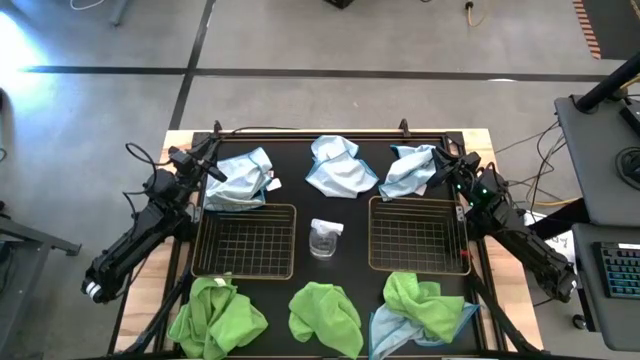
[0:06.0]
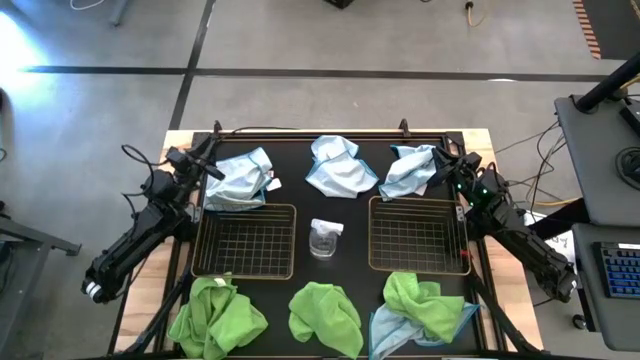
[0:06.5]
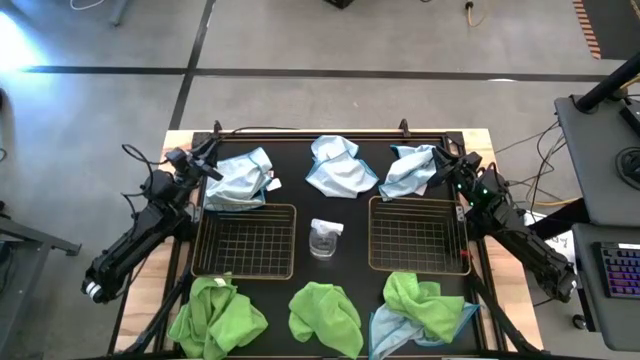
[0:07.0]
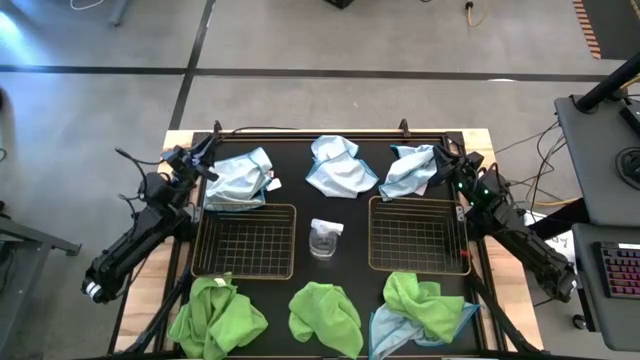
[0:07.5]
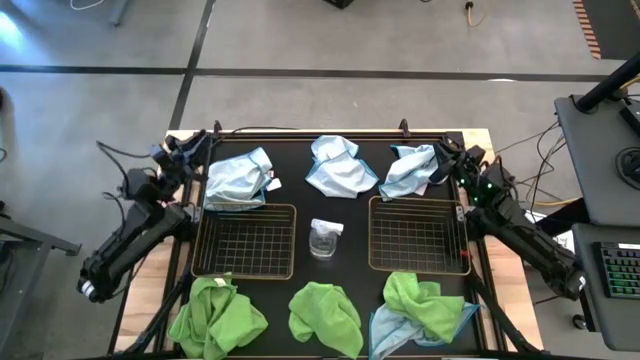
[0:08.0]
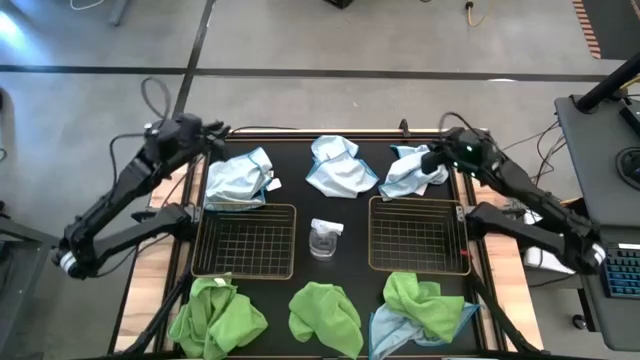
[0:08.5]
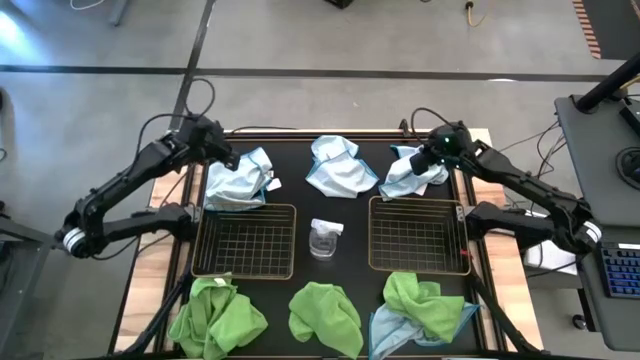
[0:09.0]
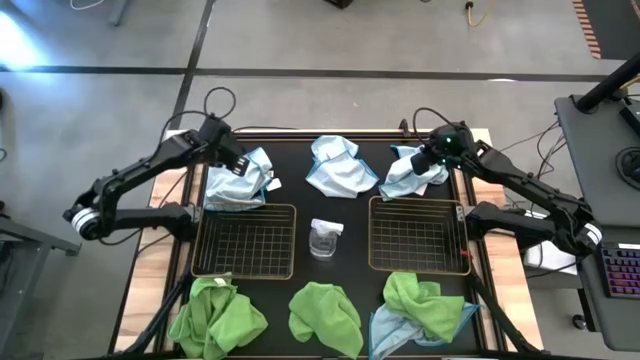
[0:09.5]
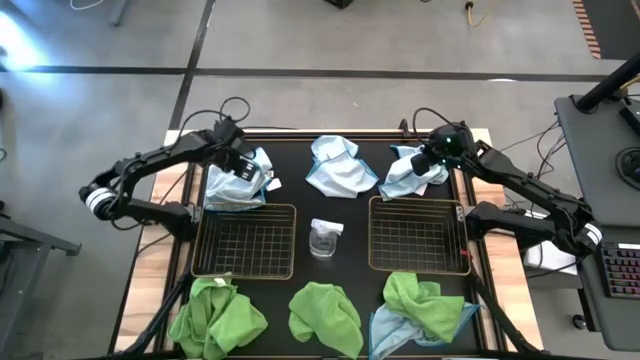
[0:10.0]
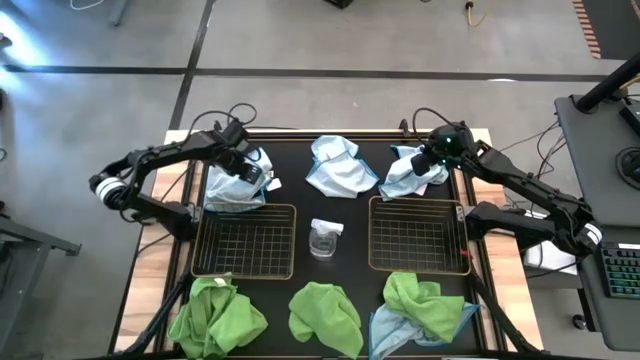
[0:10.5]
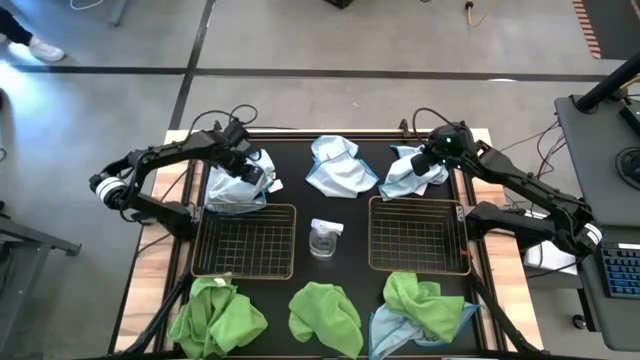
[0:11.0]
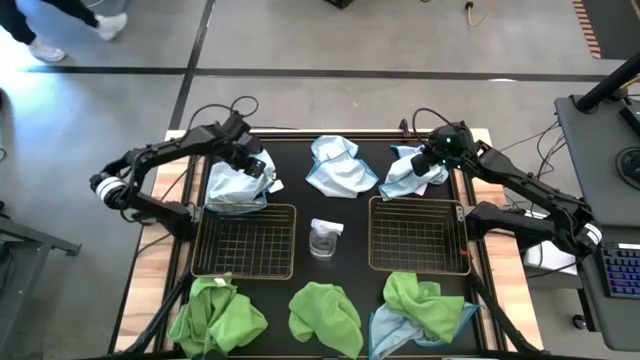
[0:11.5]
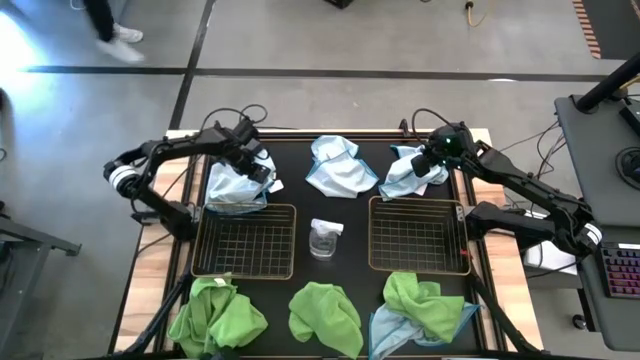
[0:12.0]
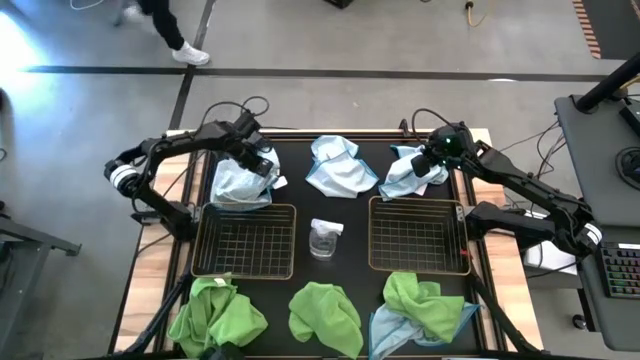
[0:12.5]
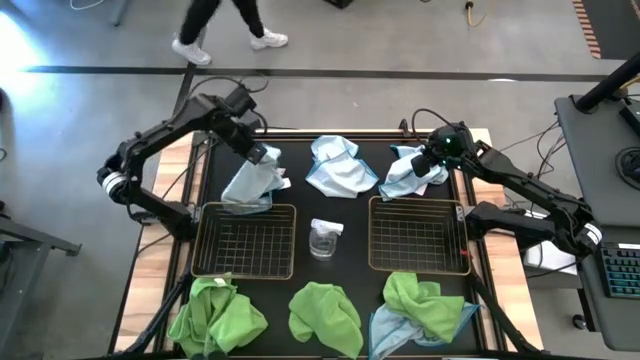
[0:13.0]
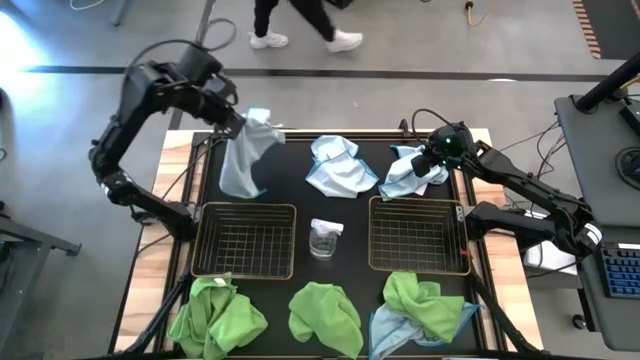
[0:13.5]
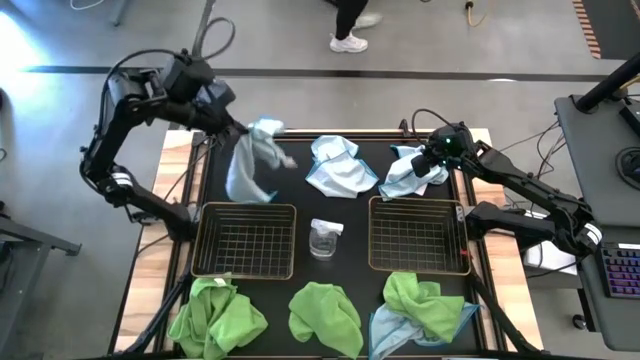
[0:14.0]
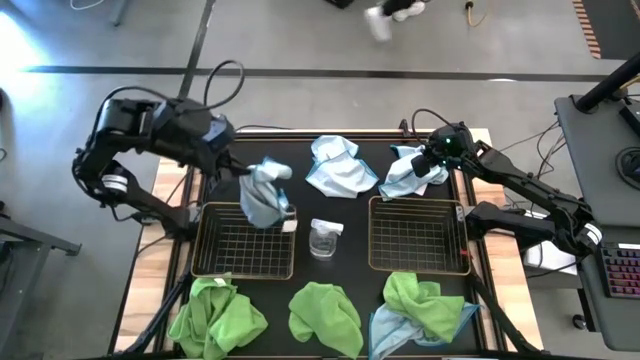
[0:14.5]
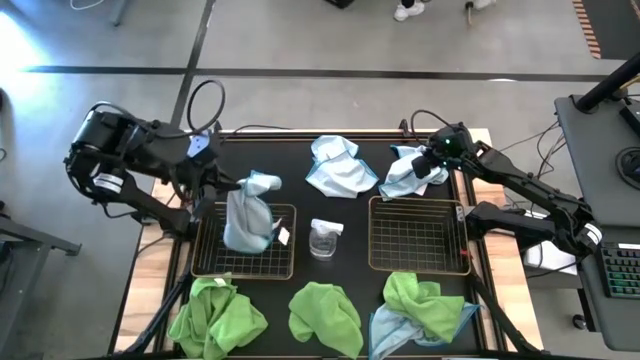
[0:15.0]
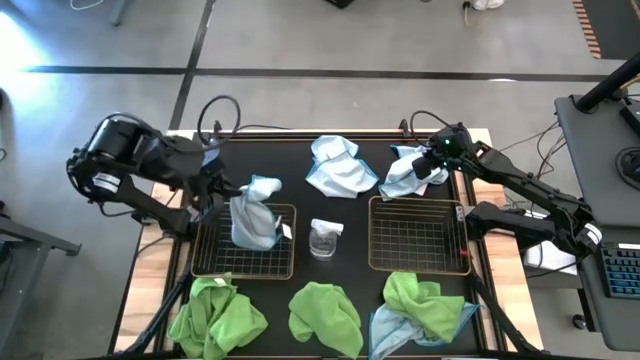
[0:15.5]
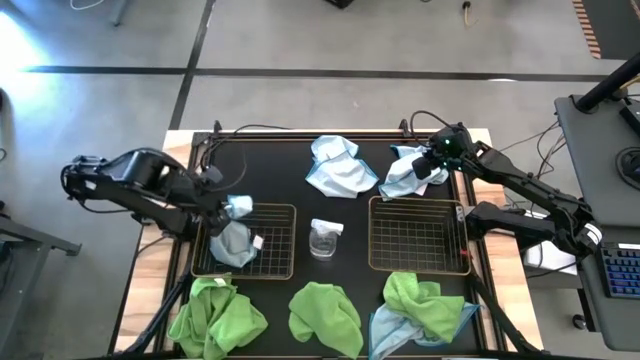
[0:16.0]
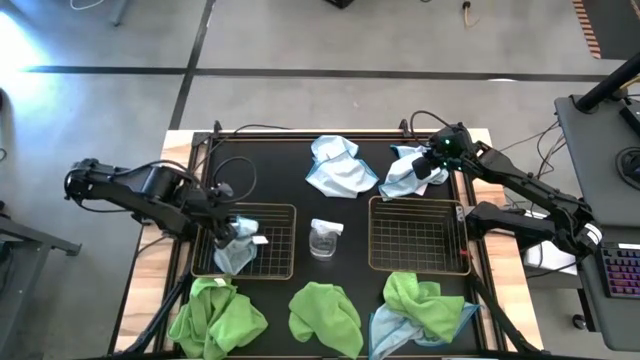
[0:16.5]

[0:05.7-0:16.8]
Task: Sort microfiber towel by color & place in baskets
Put the blue microfiber towel into the left wire basket

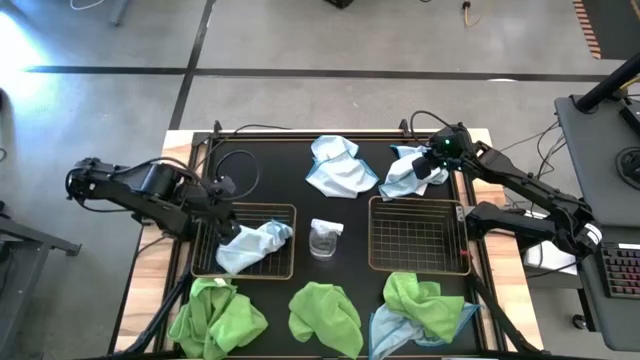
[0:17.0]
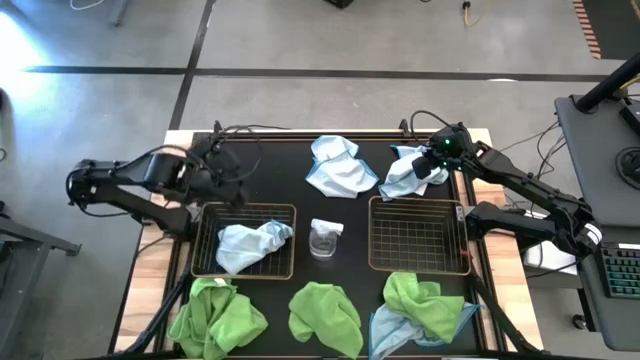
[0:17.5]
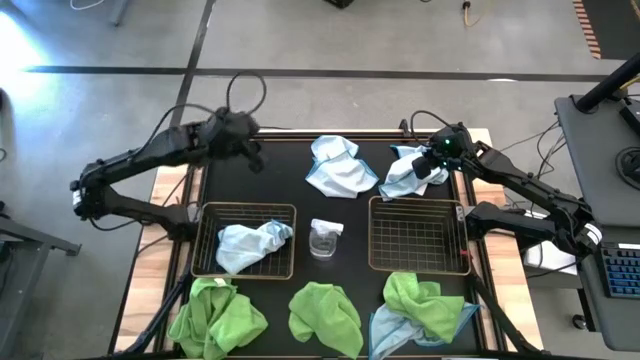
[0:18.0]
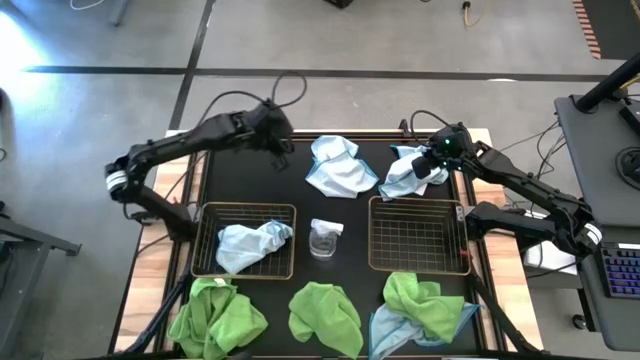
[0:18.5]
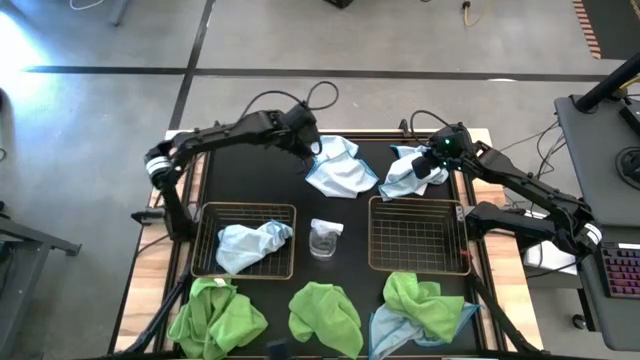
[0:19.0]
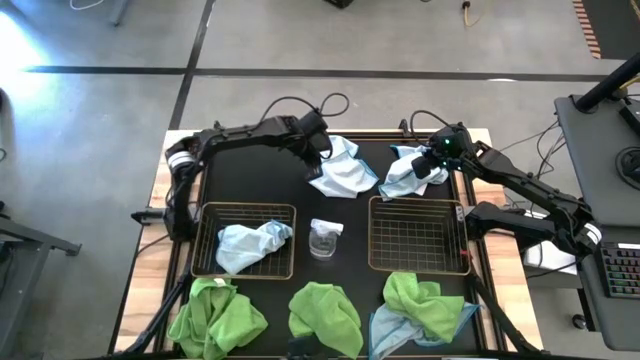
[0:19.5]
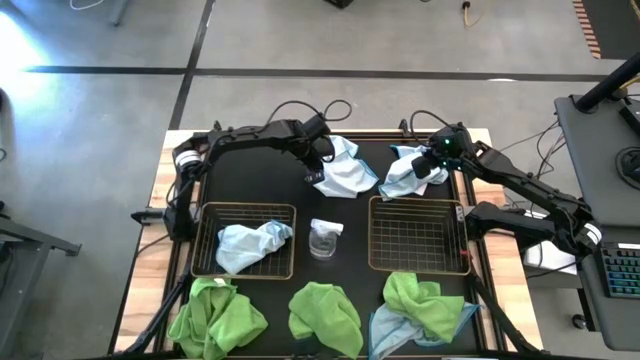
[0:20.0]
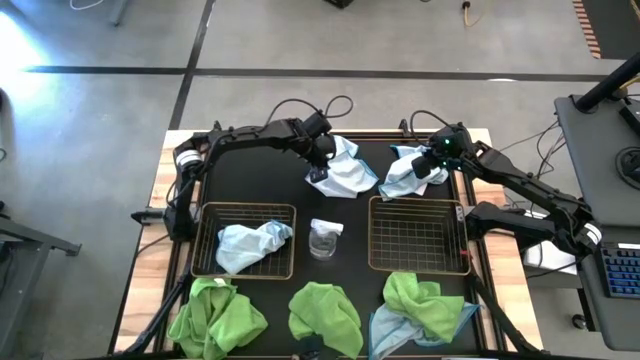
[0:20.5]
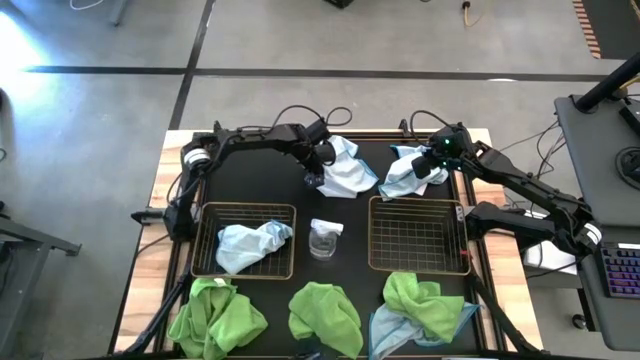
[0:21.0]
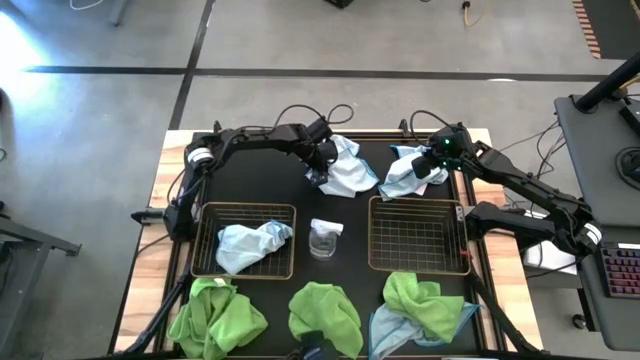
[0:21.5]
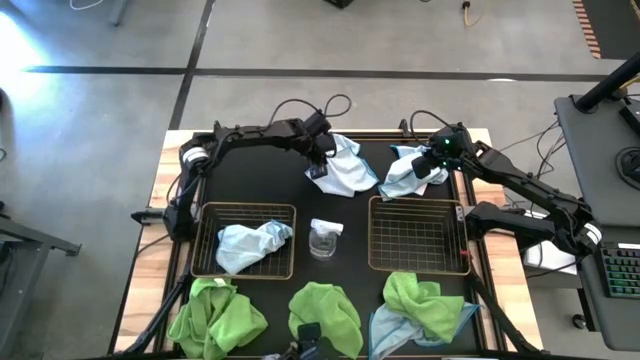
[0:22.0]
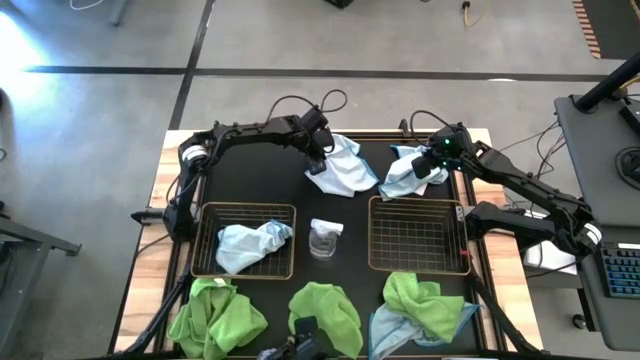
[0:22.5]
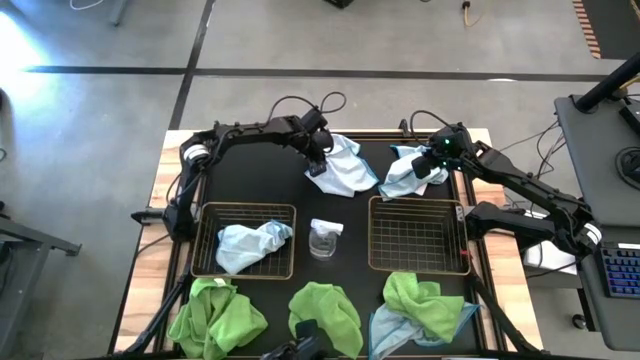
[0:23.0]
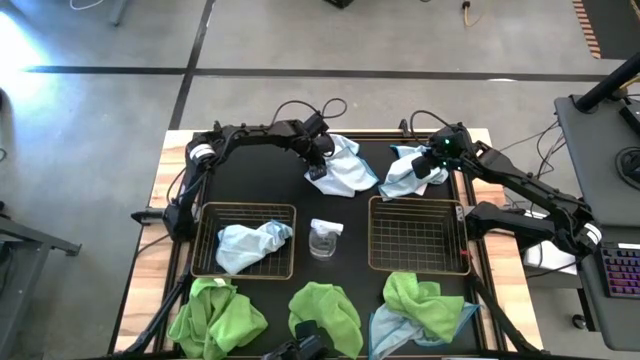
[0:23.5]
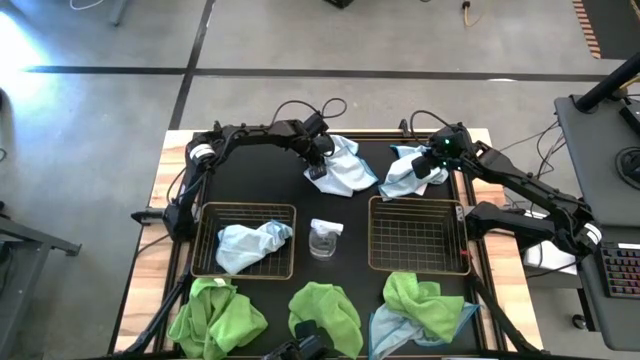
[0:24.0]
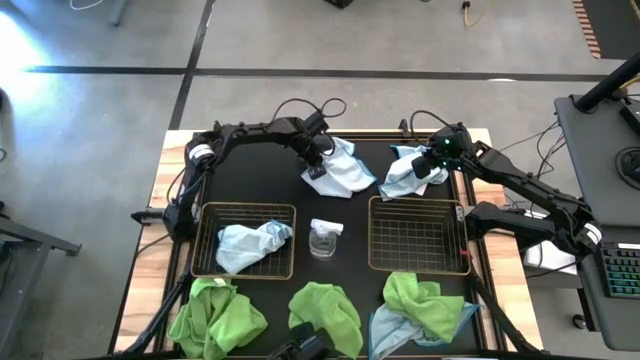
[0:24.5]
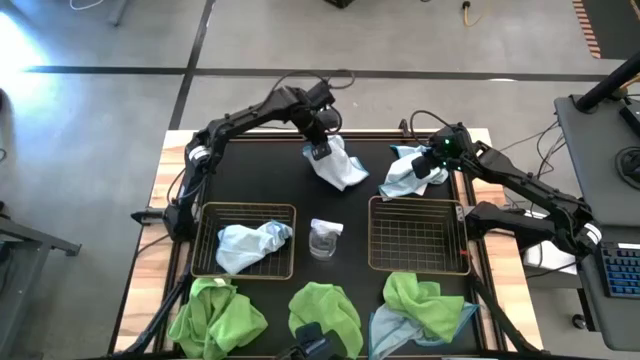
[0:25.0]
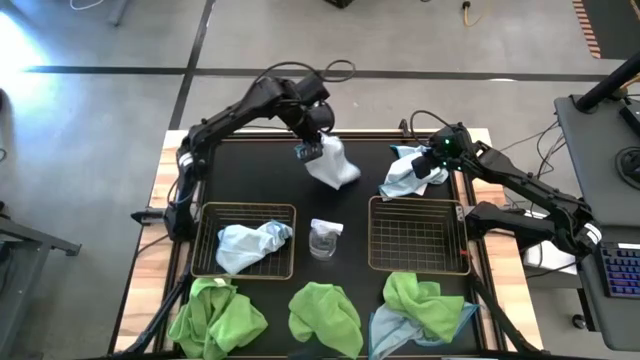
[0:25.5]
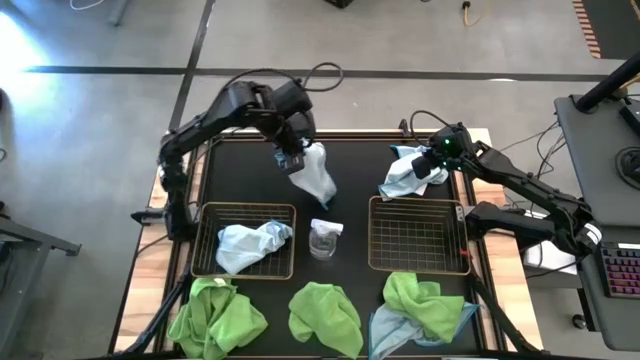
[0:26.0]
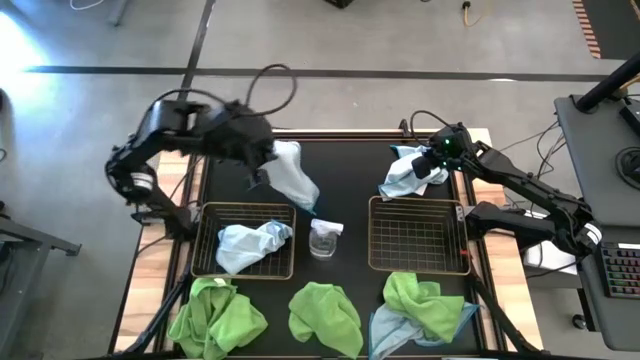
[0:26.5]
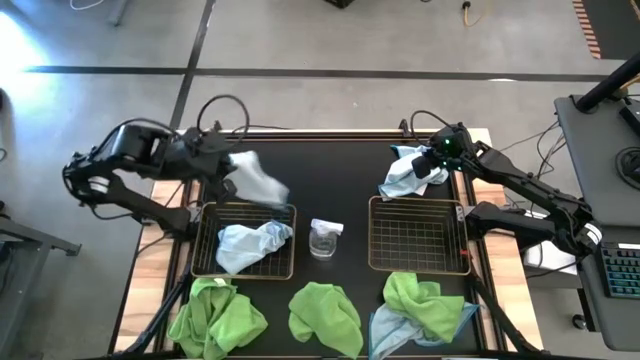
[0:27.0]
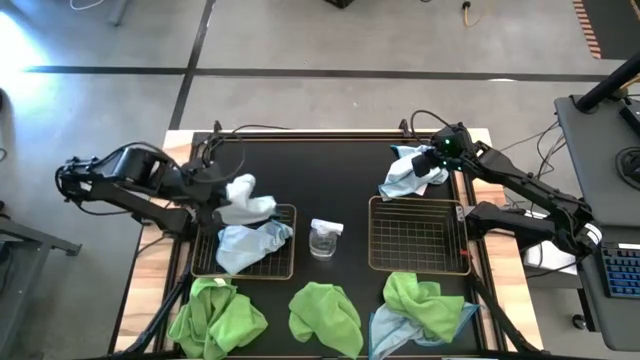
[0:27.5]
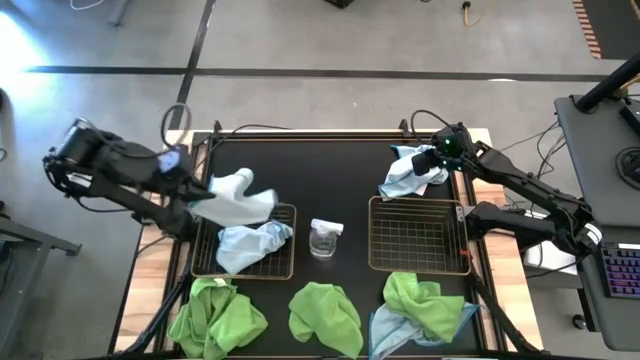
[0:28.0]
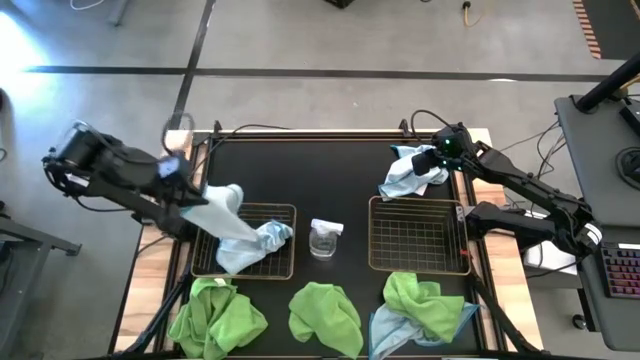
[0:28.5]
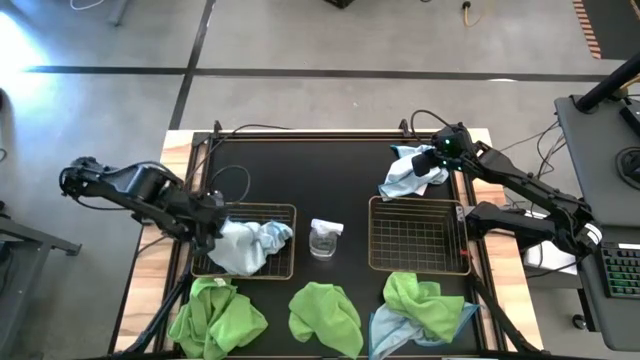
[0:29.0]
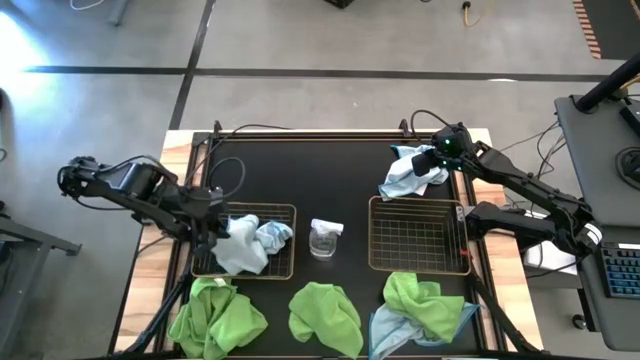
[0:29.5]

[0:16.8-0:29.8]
Put the blue microfiber towel into the left wire basket
